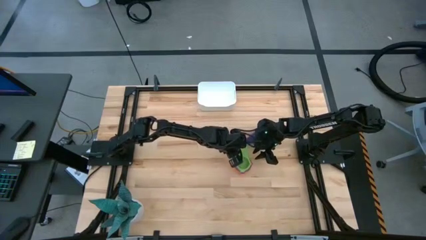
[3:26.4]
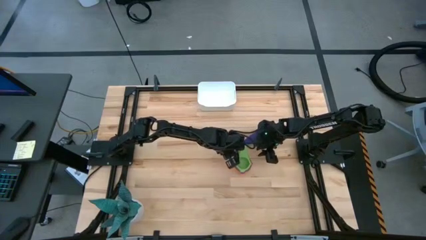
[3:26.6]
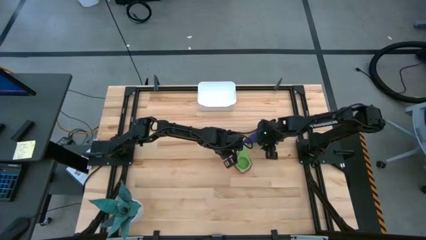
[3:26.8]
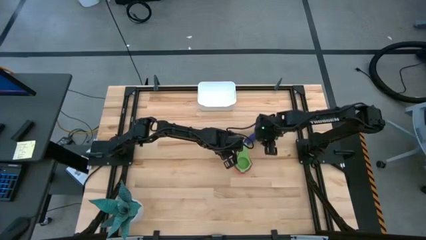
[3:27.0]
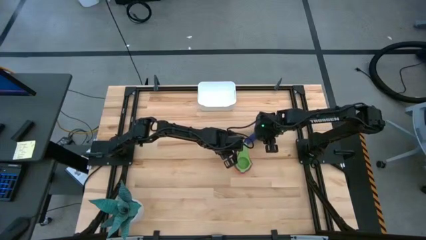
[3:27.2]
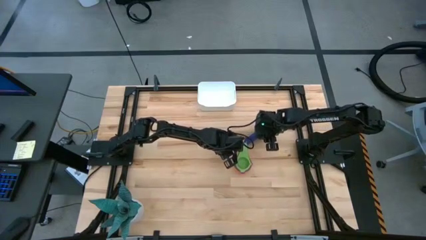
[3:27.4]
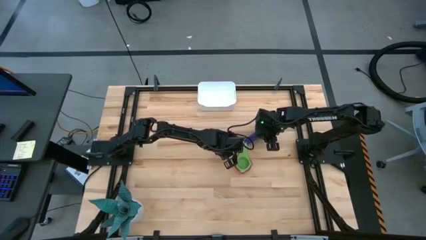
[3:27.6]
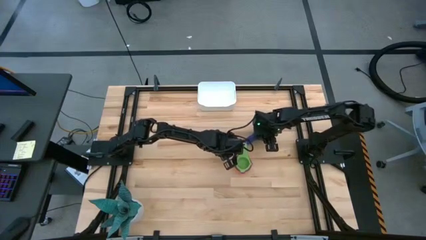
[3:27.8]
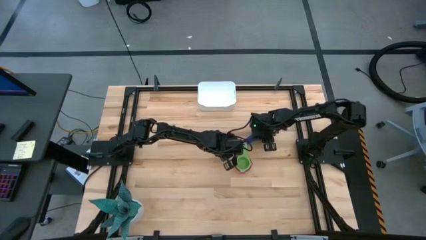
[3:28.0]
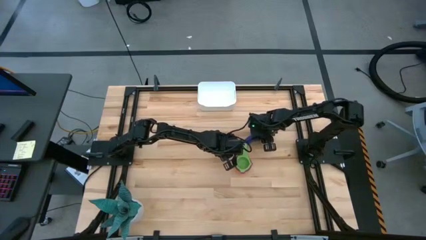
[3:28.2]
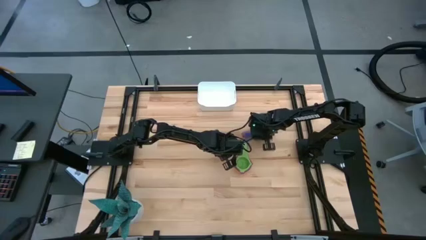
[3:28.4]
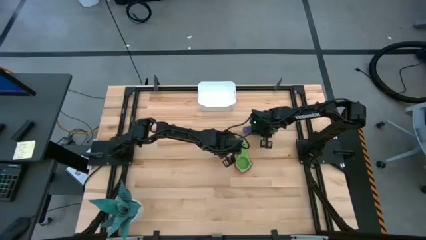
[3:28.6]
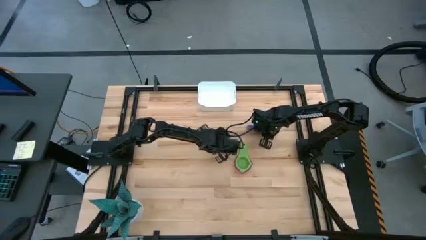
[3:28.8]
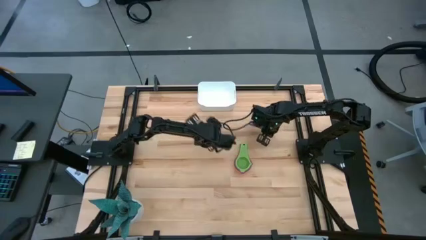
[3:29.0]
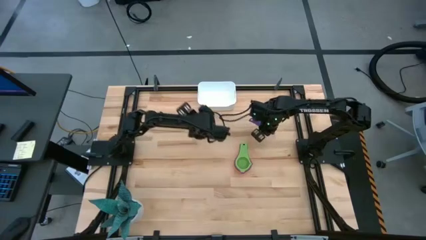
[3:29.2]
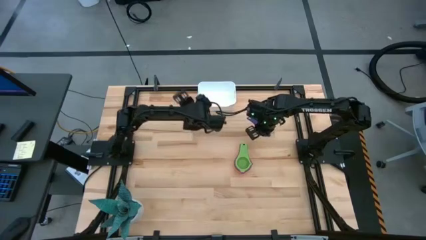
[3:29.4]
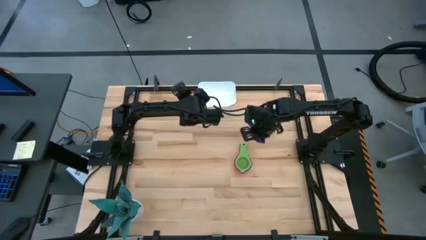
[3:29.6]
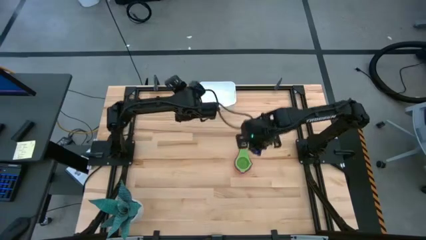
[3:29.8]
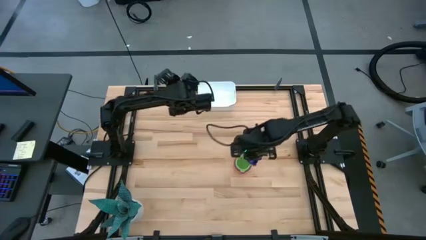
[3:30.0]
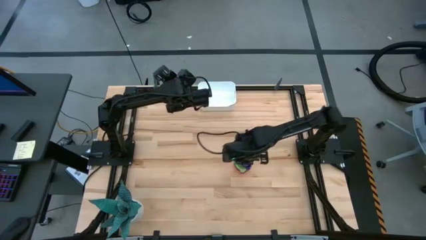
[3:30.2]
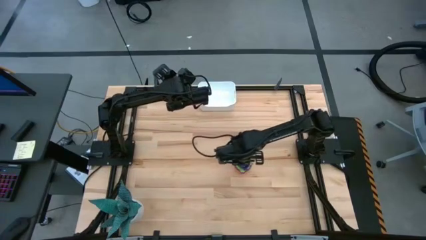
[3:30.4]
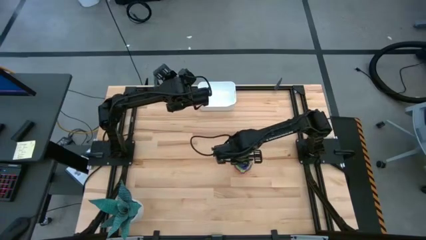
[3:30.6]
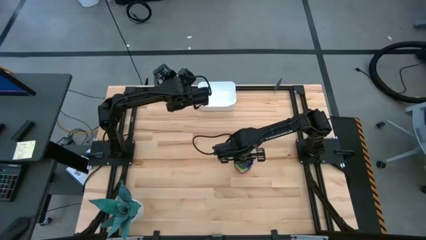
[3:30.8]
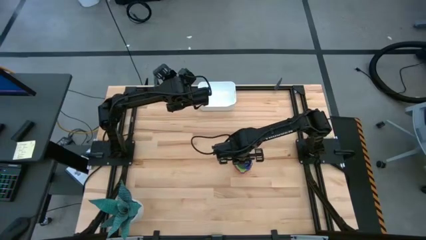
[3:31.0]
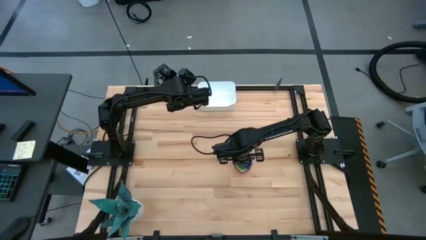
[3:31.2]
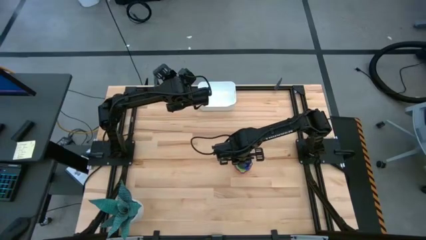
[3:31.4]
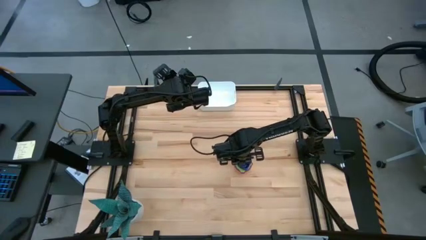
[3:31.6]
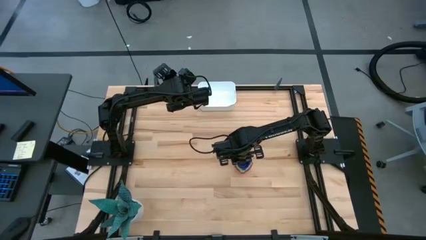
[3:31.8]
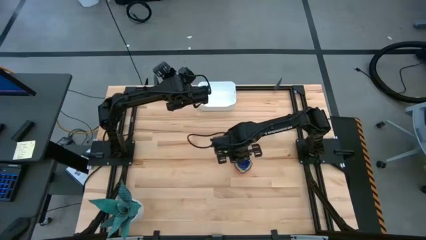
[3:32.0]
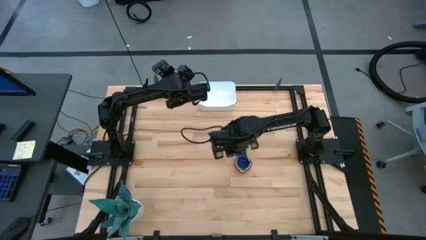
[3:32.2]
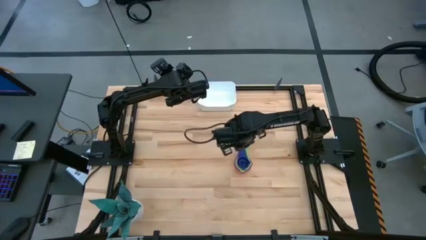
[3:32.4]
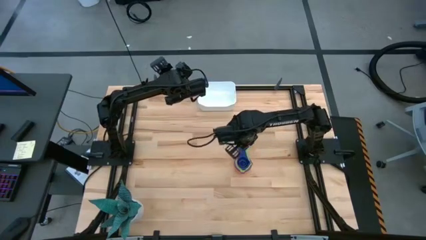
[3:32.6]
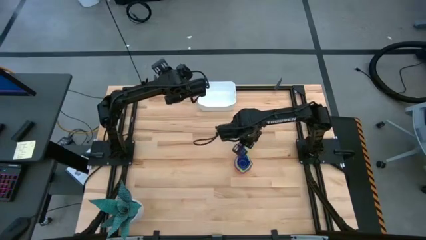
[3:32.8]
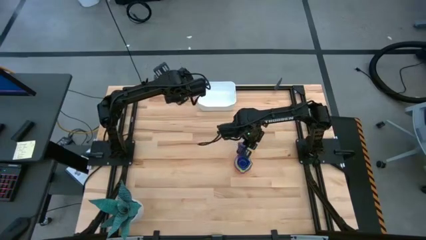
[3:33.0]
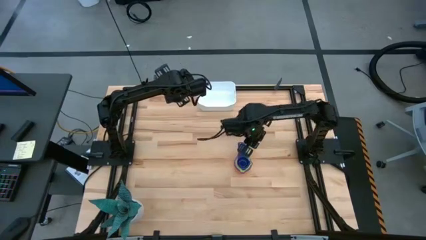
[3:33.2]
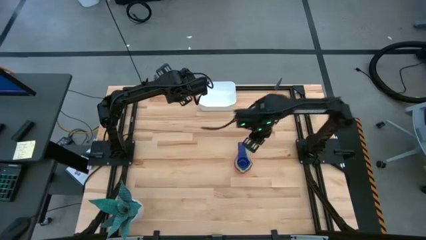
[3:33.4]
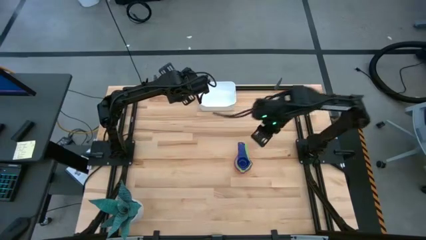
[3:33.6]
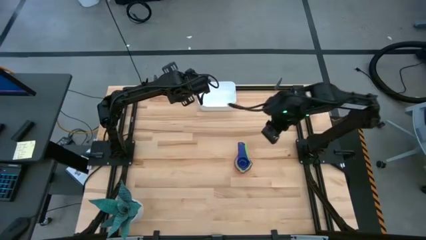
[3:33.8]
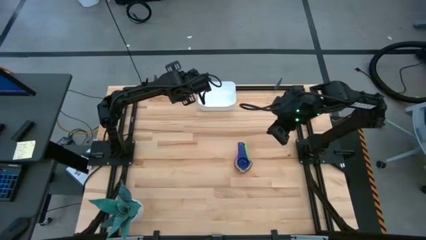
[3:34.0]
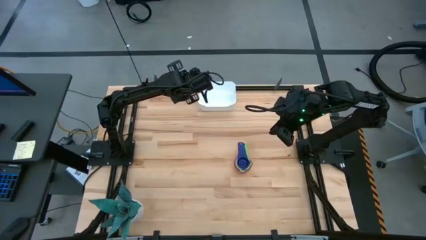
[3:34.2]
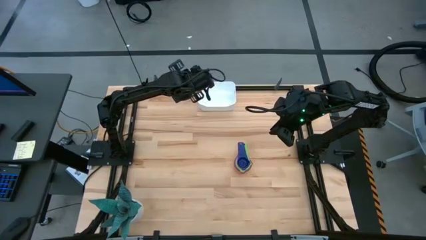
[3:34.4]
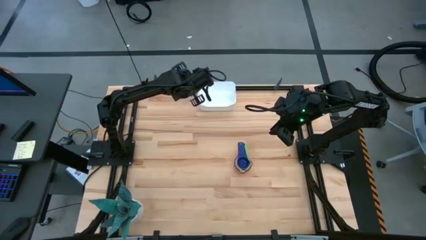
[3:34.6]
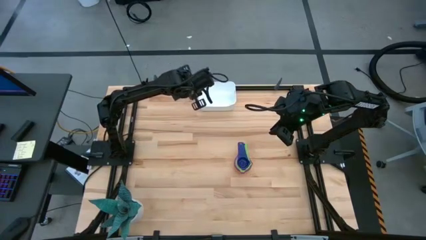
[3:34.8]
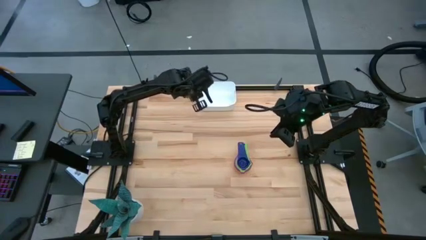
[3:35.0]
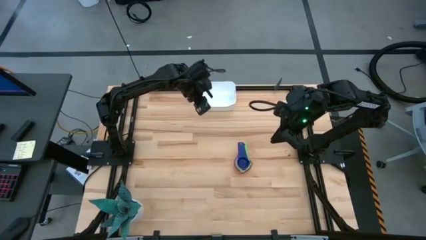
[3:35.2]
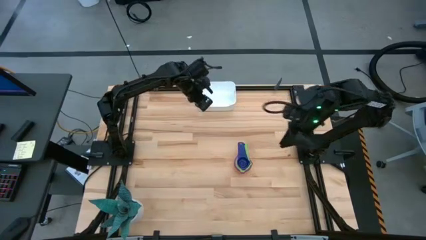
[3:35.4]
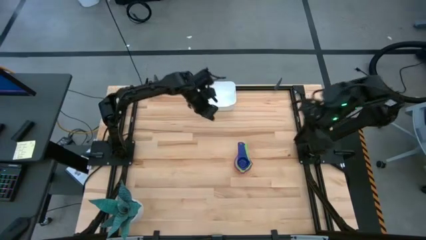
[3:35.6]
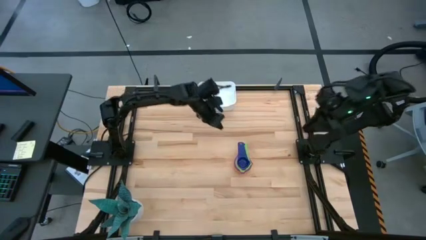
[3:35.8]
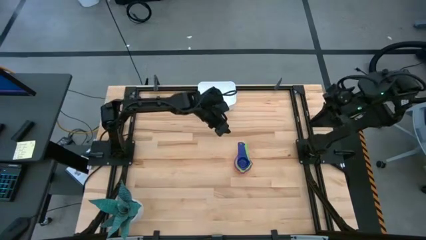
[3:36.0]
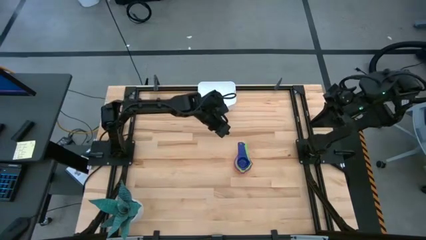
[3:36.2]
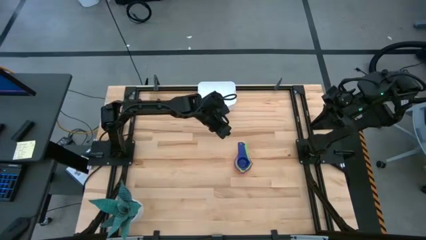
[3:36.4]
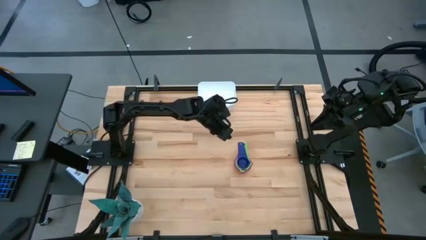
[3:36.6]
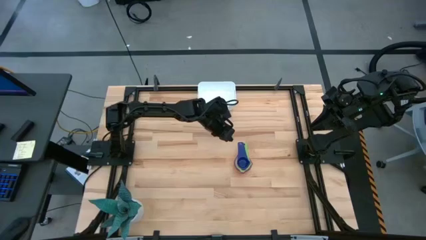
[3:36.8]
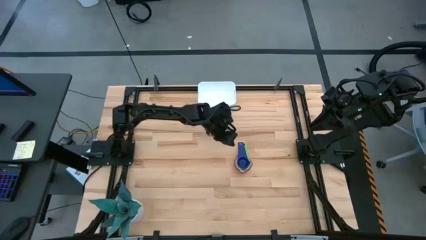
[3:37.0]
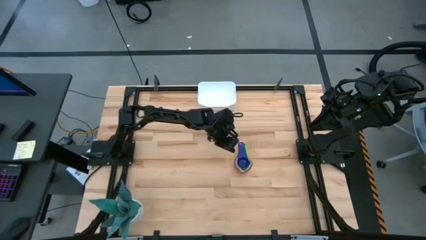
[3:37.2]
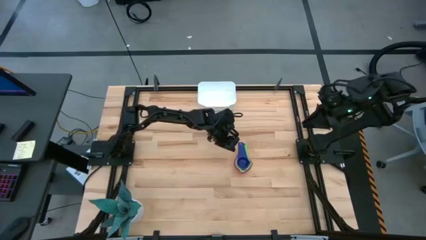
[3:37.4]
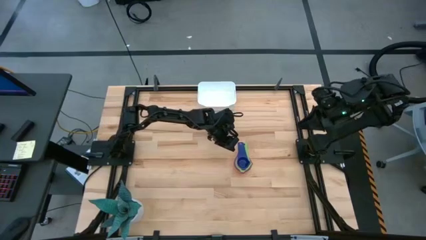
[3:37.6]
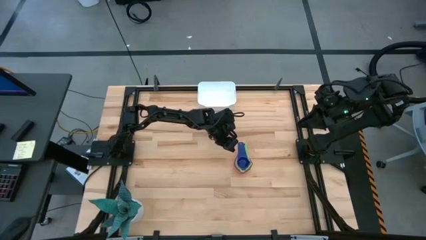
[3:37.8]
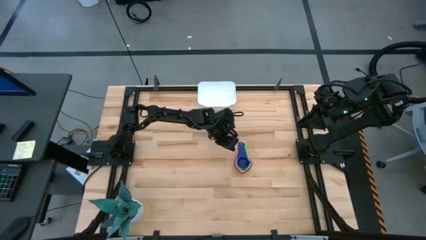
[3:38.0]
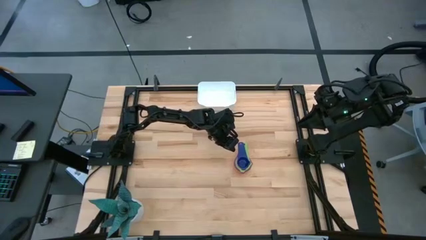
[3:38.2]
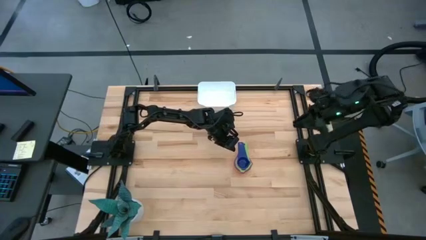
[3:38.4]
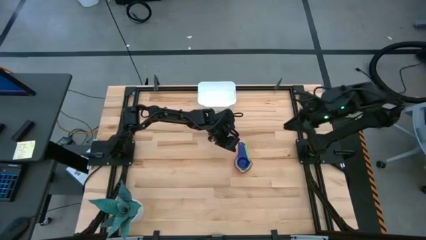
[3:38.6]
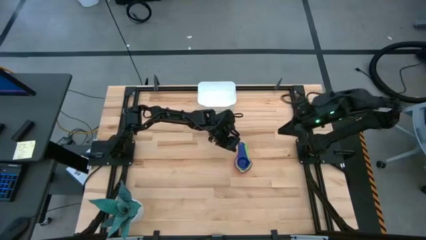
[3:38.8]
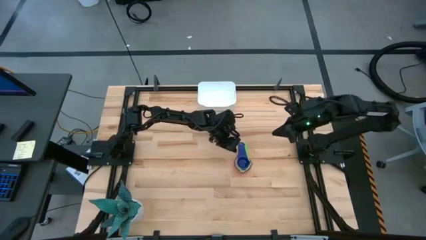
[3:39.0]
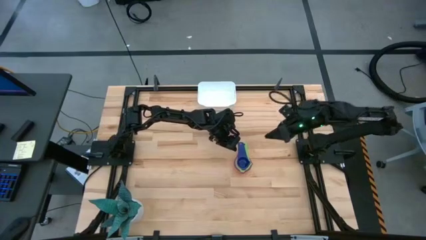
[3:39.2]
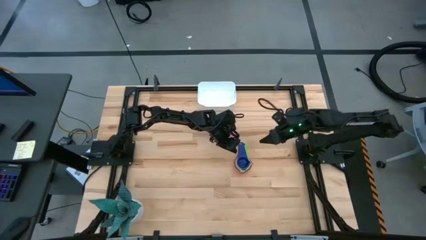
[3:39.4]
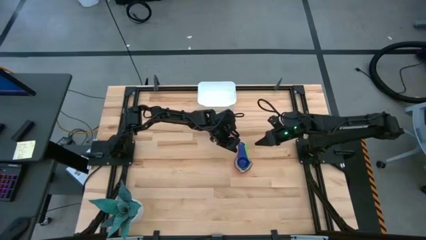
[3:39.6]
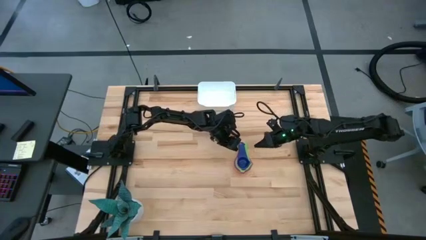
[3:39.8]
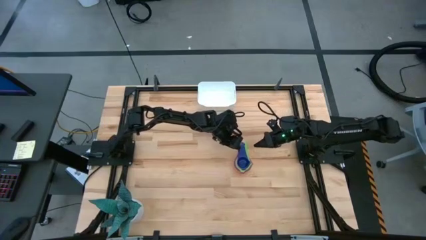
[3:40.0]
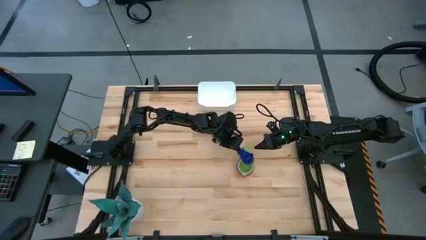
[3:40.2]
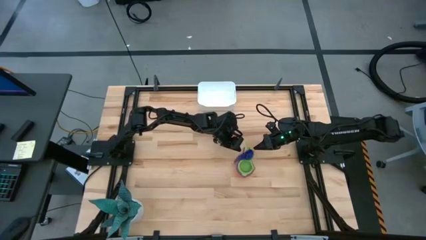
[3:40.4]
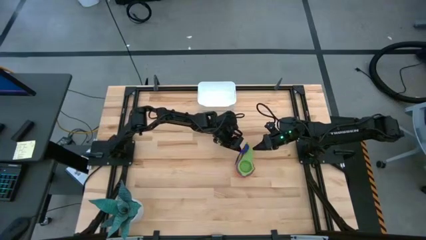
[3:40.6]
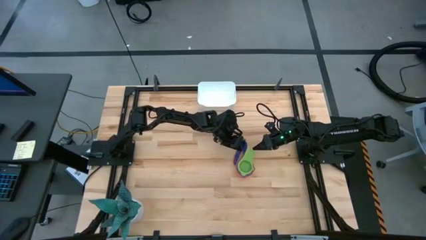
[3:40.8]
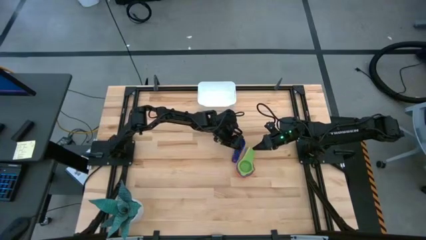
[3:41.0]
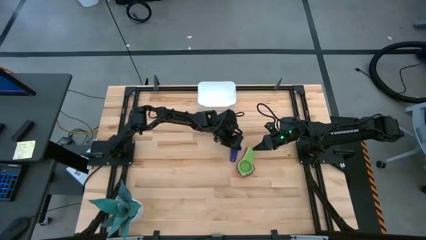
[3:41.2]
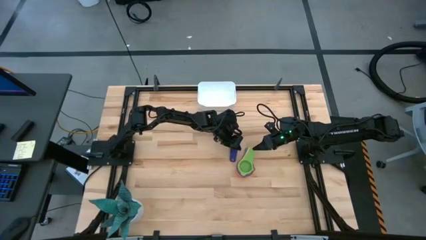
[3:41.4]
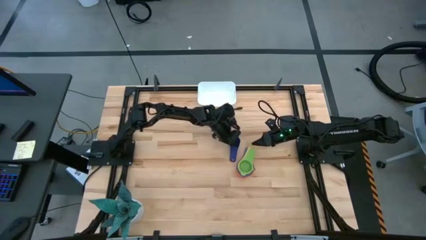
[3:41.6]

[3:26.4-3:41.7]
Task: Nest measuring cups in basket
Stack the dark blue measuring cup on top of the green measuring cup
